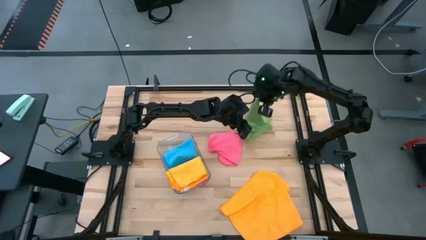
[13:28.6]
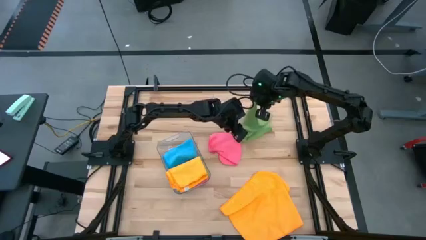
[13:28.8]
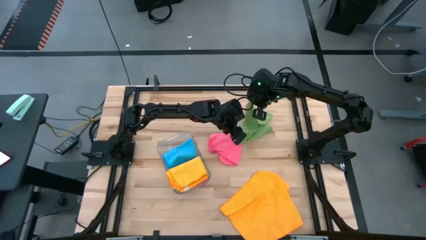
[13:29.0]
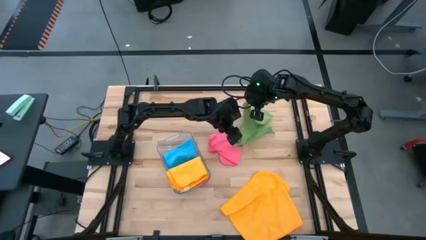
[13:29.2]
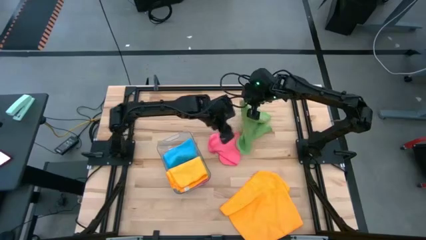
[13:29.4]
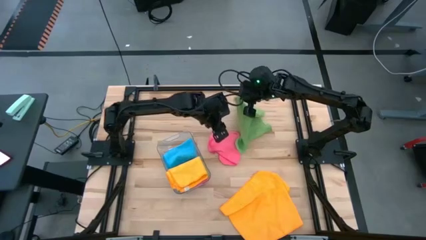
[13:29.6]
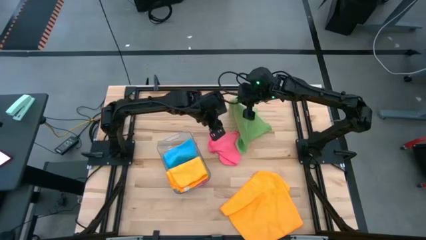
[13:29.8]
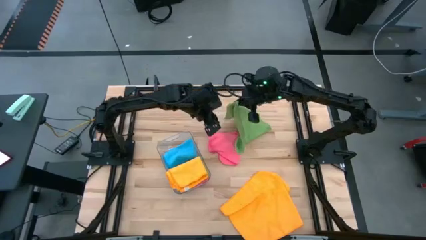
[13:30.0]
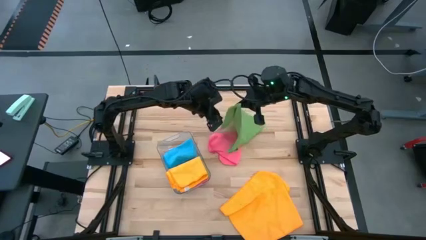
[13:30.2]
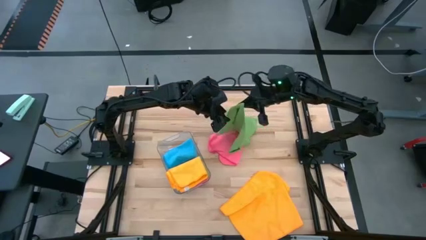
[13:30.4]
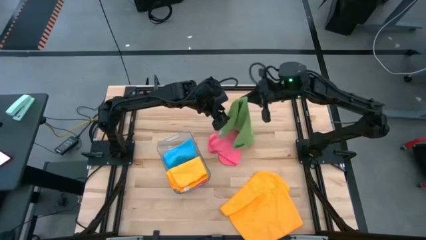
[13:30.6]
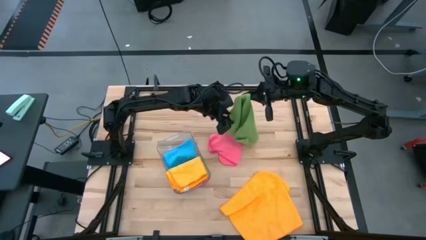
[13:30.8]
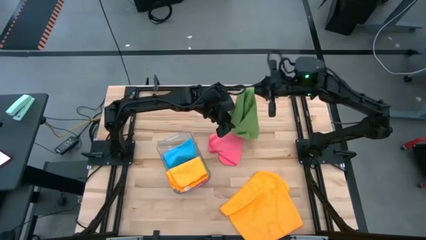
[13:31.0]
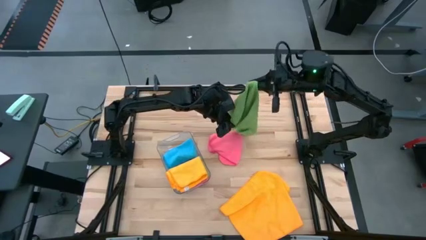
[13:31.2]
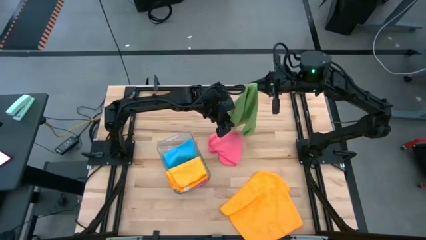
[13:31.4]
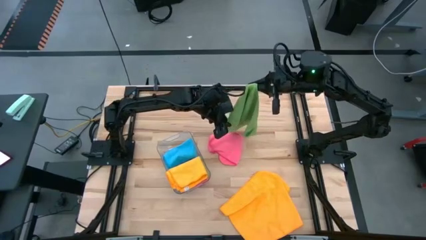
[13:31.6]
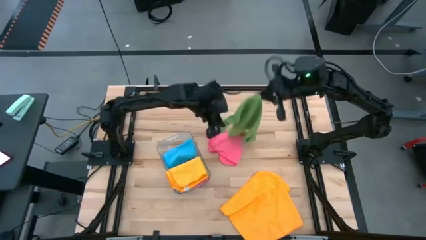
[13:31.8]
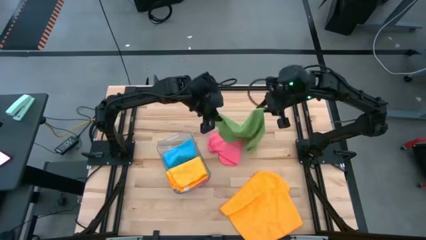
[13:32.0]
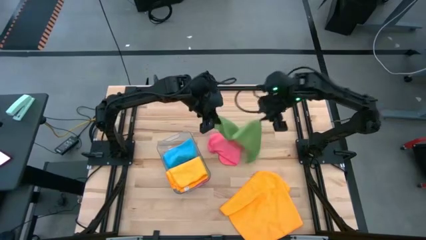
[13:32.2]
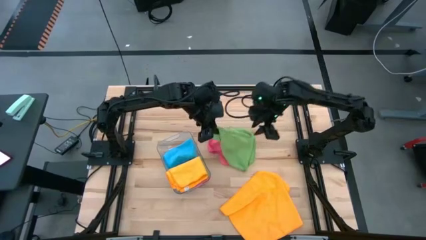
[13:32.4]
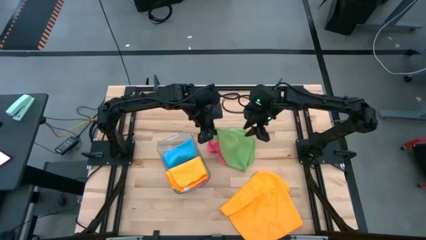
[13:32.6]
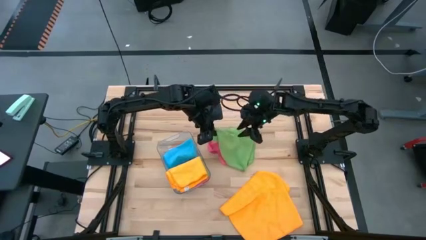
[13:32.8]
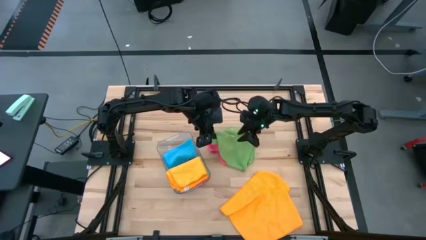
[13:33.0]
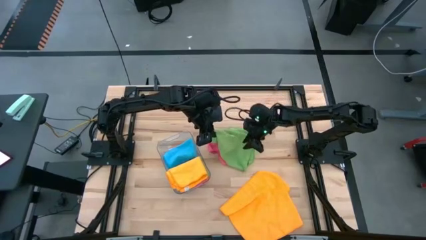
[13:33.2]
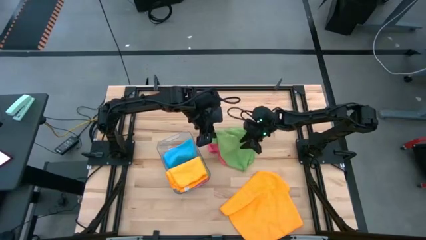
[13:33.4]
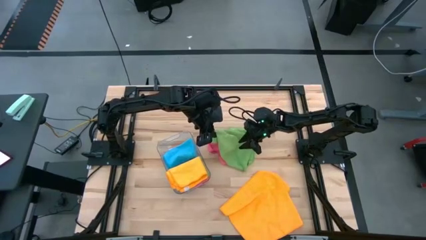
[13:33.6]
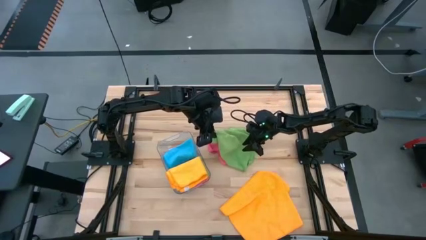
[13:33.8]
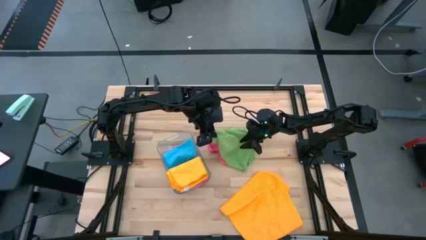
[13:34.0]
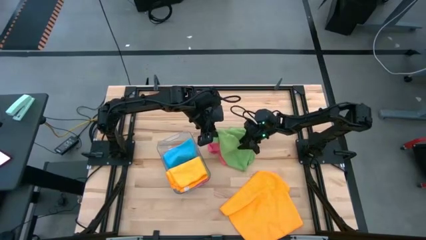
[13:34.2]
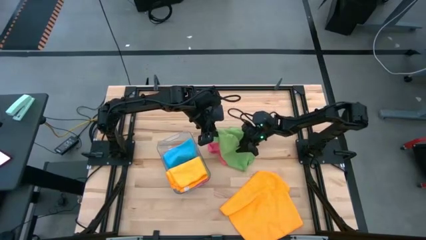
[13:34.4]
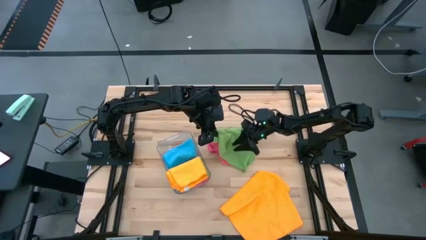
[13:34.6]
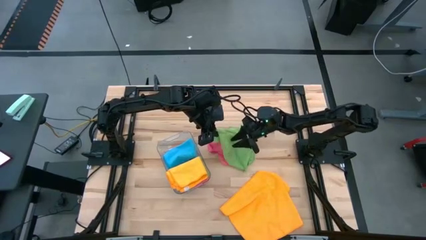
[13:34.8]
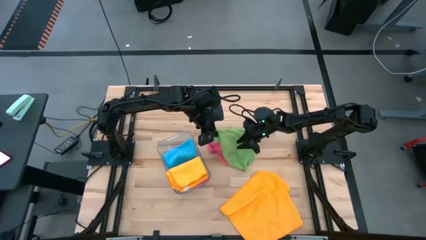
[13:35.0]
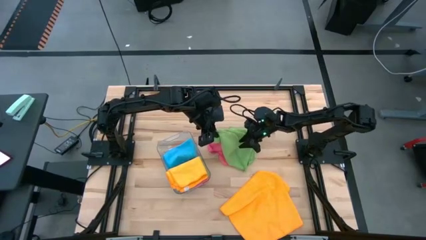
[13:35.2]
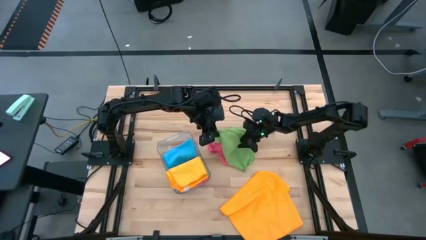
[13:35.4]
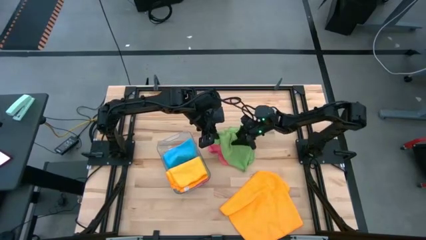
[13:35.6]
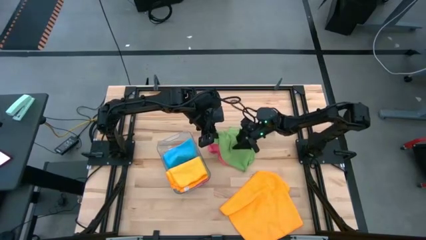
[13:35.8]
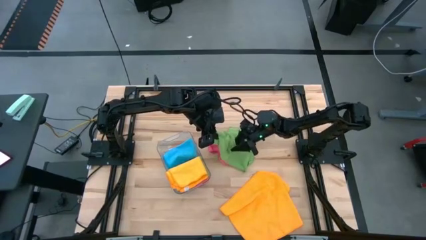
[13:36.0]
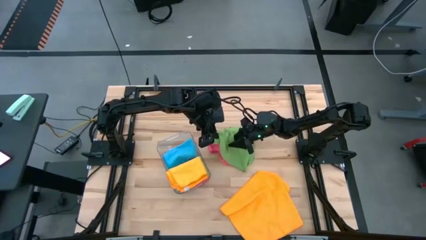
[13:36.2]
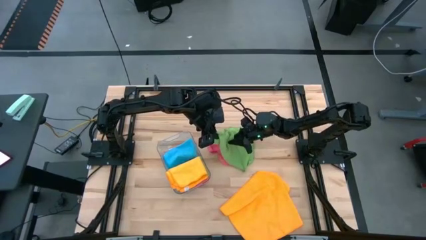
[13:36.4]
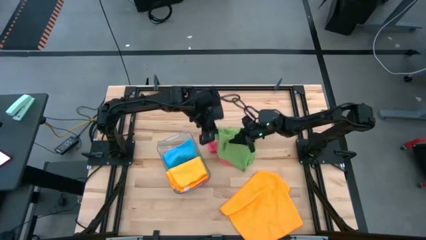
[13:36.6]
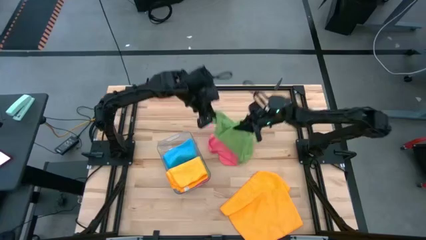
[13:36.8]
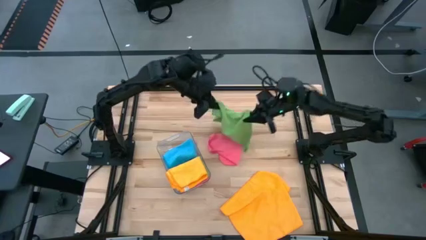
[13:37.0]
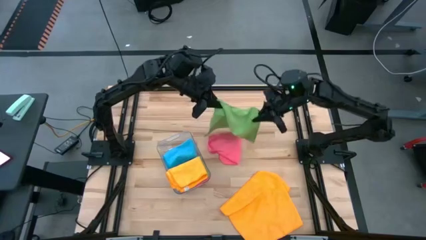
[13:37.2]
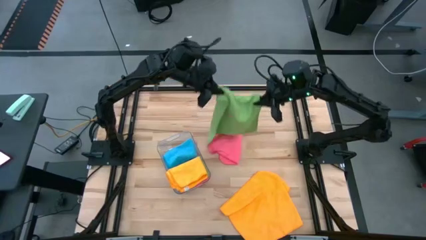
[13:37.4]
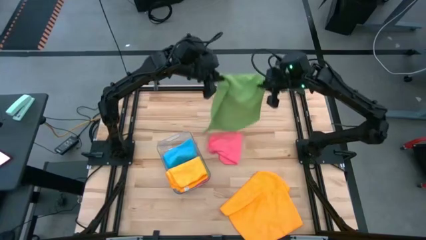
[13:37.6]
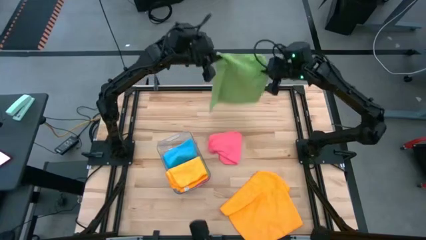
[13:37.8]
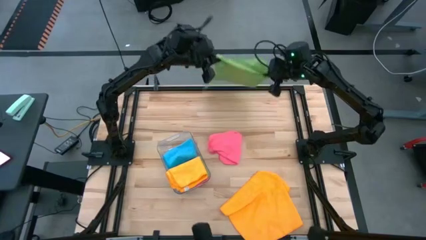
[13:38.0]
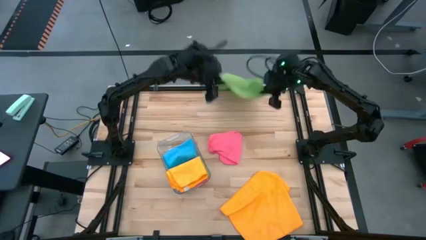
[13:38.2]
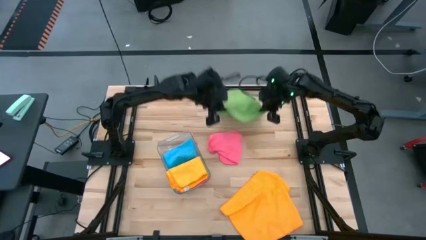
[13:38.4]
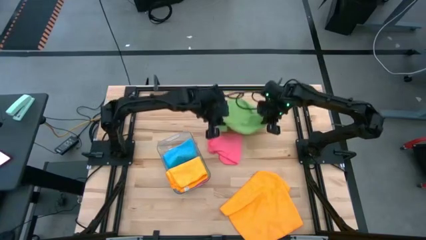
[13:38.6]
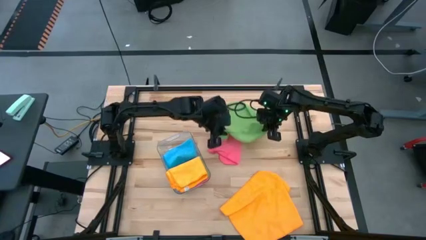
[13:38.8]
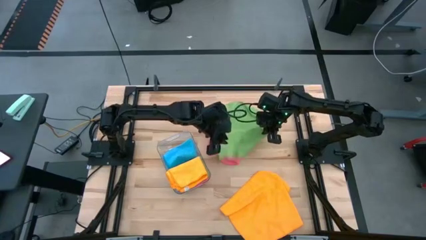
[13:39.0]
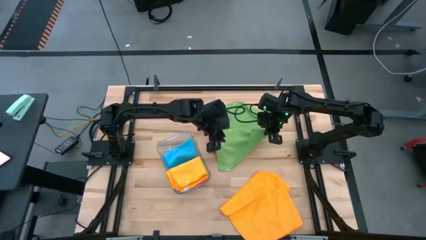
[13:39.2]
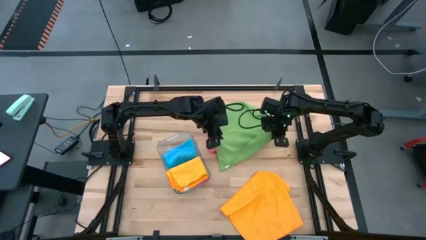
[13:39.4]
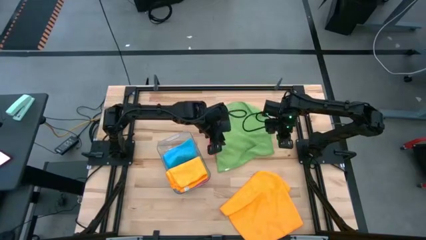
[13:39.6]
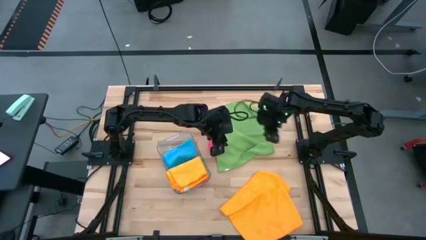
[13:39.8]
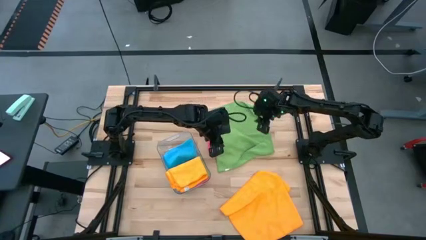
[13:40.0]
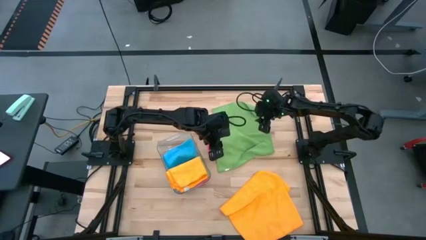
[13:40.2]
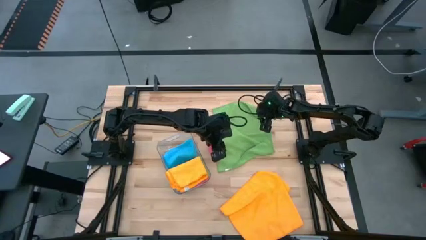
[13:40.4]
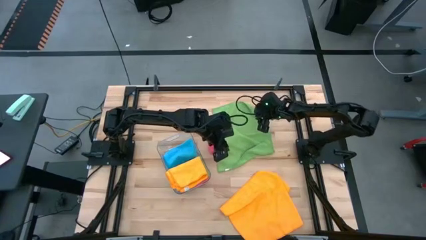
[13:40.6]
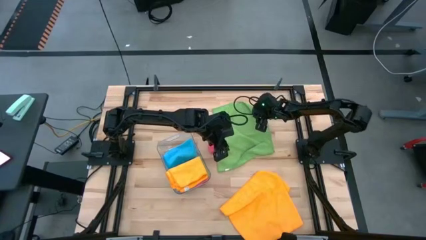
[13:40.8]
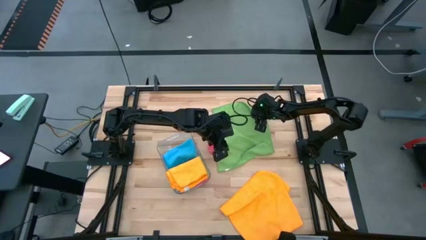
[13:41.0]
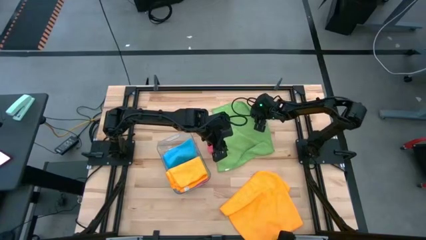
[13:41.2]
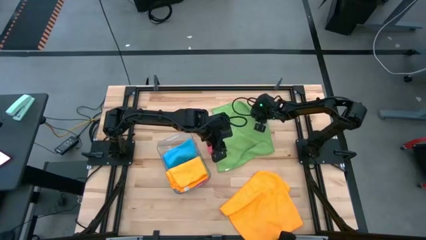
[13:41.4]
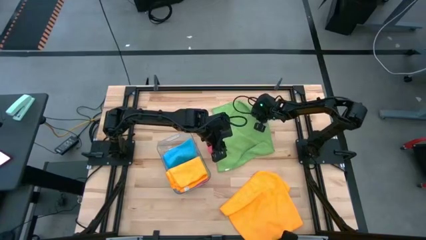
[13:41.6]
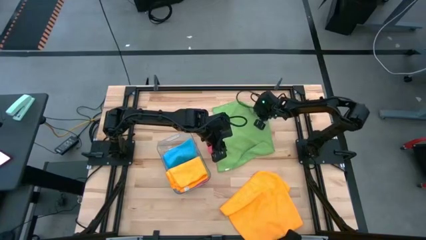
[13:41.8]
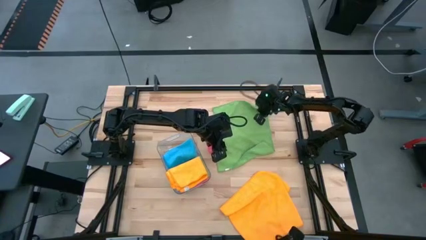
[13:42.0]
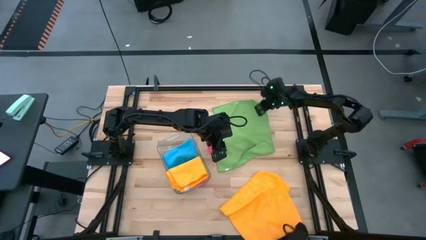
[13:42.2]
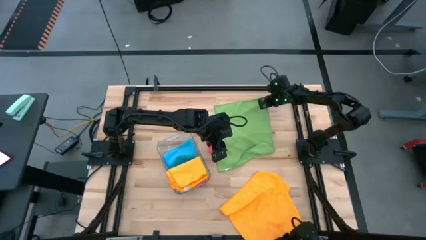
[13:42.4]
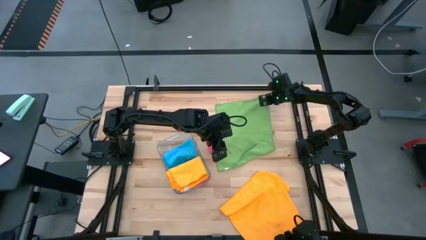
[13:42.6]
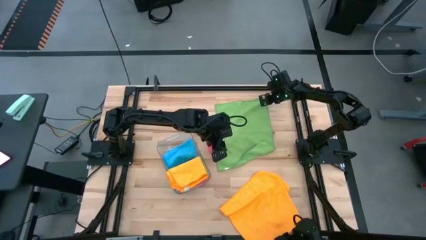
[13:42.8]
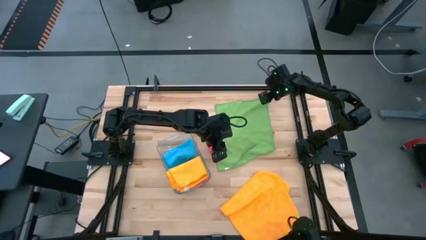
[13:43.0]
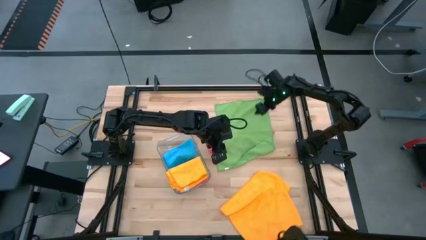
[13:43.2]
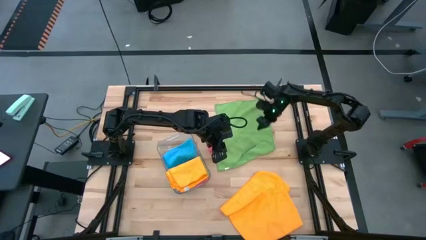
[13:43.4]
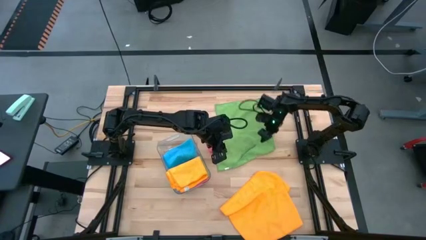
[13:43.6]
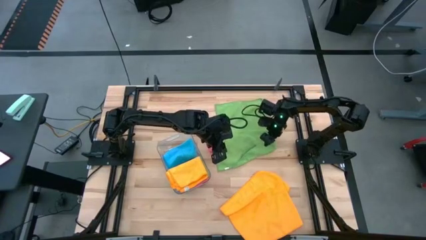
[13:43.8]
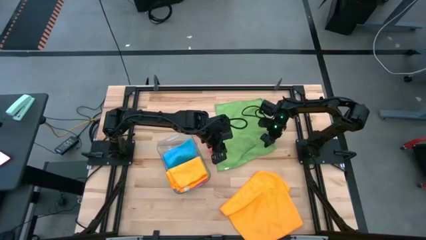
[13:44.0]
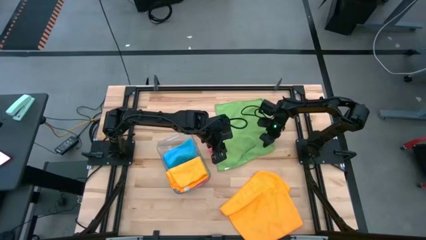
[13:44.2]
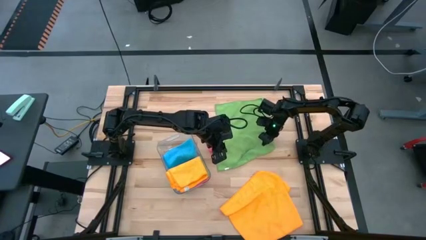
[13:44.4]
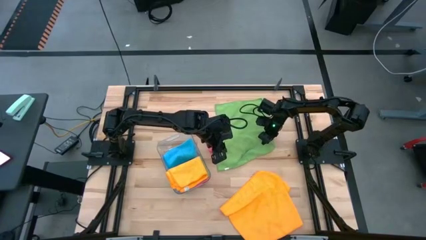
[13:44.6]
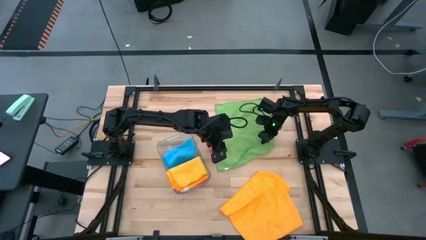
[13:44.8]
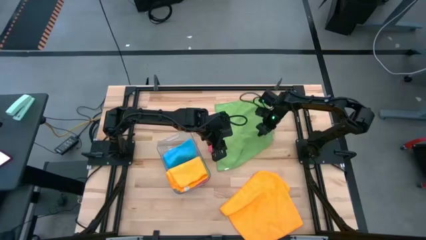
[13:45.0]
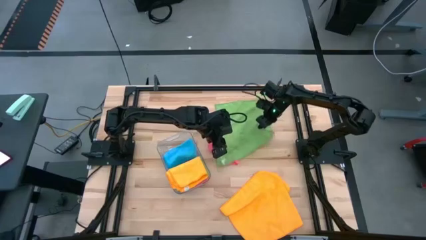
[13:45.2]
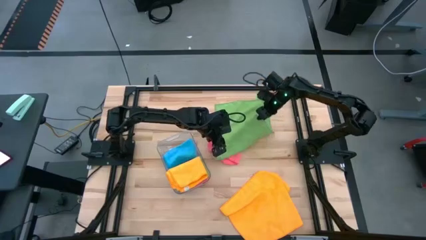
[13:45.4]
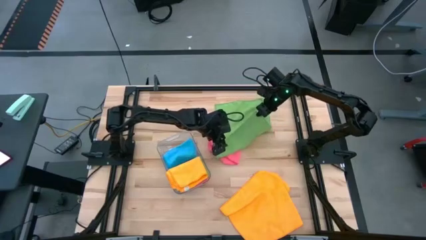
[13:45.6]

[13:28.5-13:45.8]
Task: Fold microfiber towels
Fold the green towel
